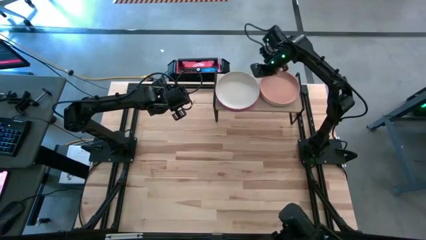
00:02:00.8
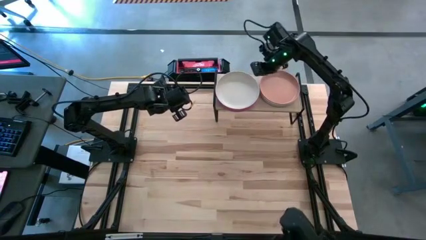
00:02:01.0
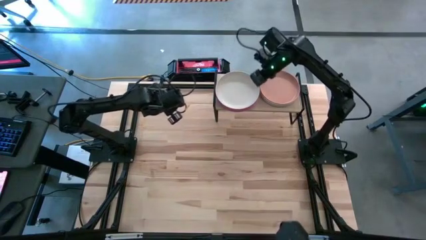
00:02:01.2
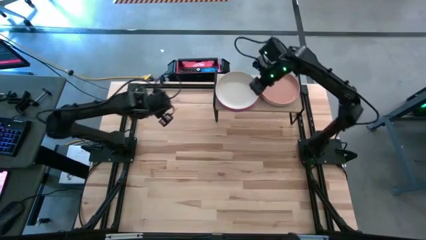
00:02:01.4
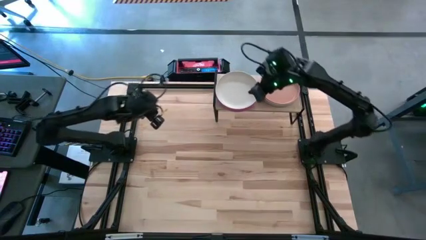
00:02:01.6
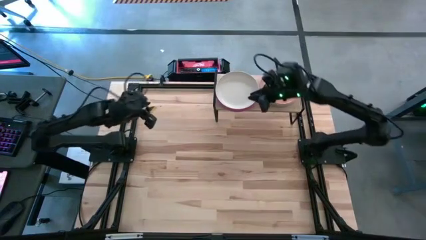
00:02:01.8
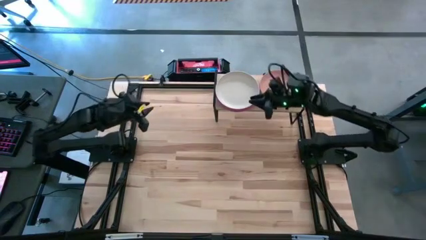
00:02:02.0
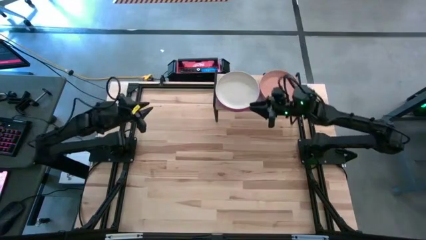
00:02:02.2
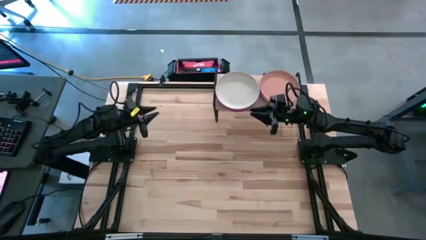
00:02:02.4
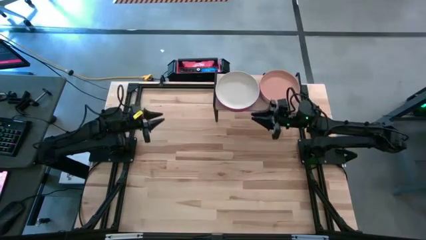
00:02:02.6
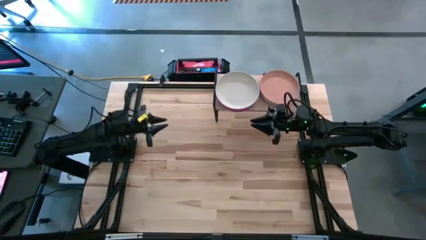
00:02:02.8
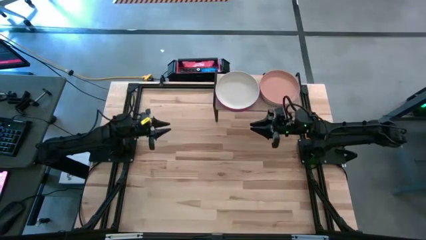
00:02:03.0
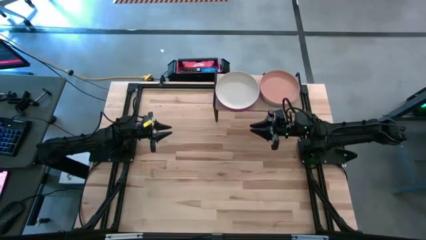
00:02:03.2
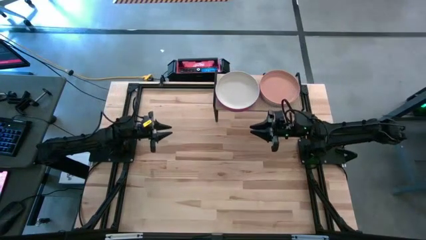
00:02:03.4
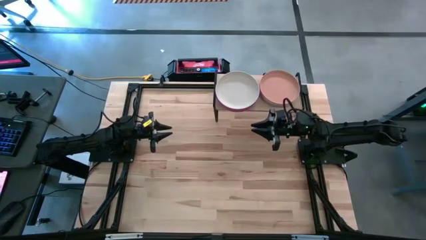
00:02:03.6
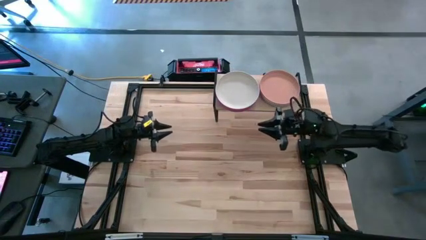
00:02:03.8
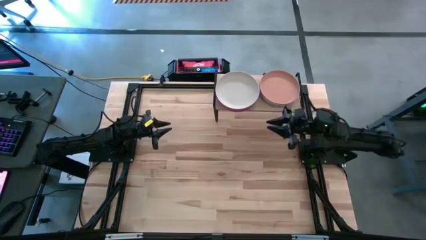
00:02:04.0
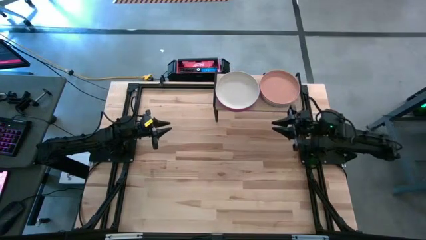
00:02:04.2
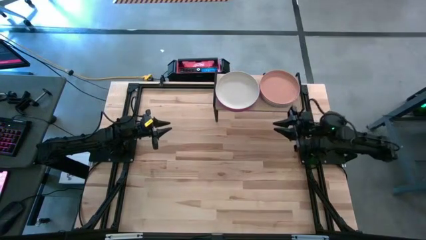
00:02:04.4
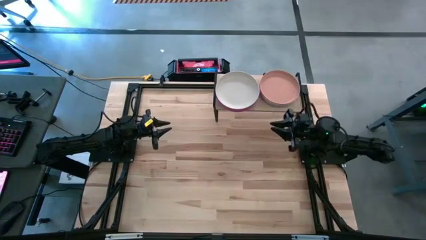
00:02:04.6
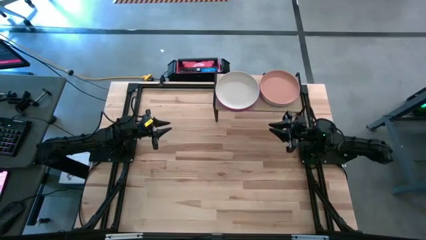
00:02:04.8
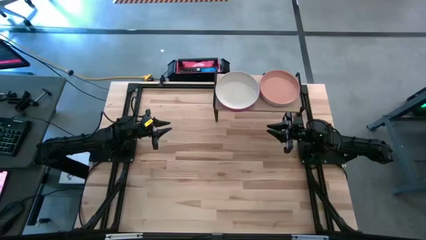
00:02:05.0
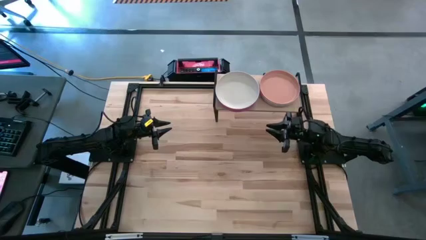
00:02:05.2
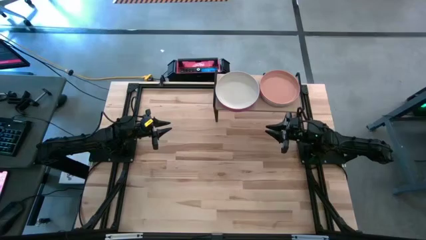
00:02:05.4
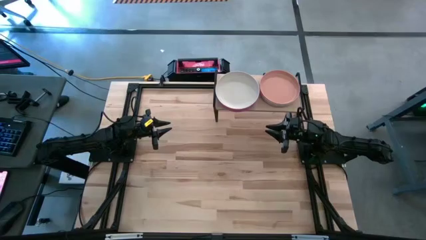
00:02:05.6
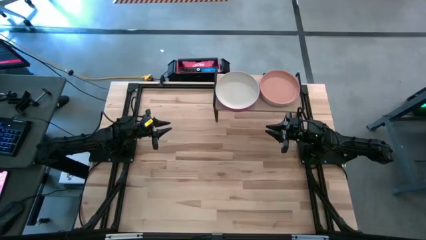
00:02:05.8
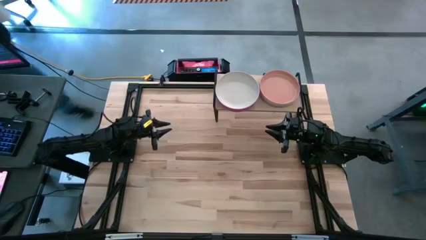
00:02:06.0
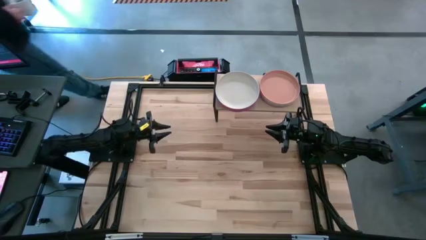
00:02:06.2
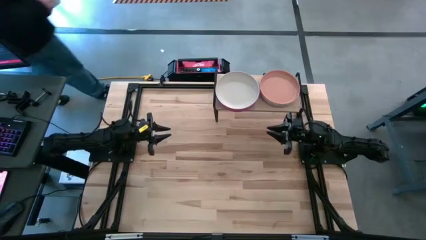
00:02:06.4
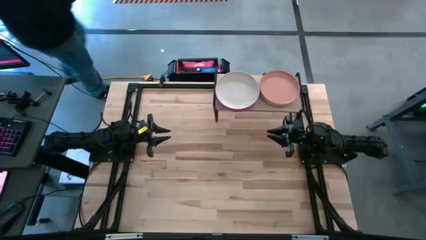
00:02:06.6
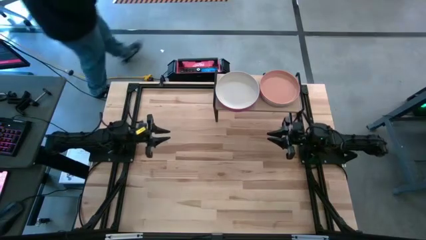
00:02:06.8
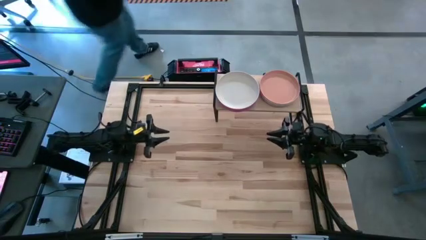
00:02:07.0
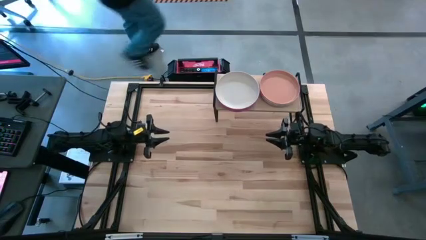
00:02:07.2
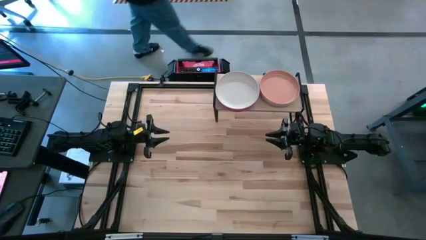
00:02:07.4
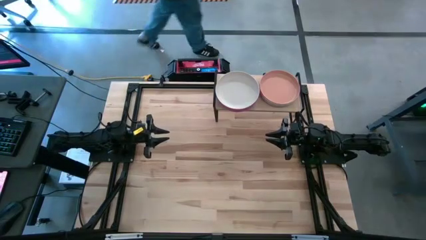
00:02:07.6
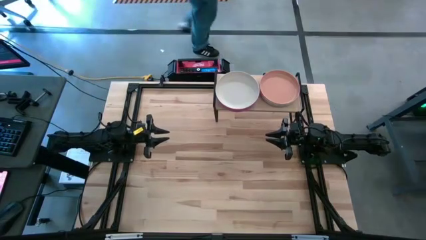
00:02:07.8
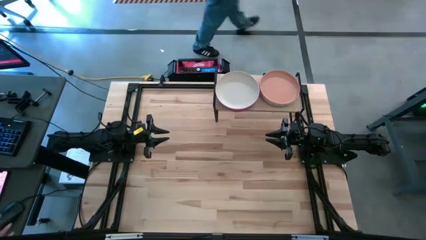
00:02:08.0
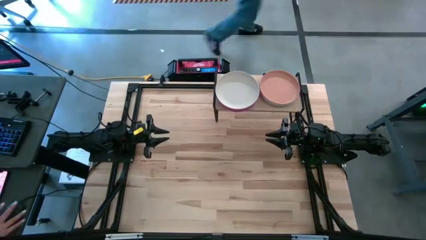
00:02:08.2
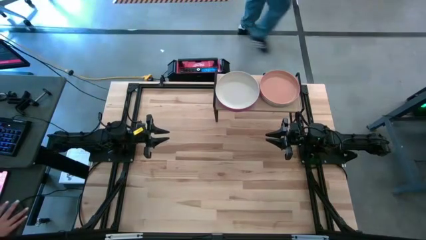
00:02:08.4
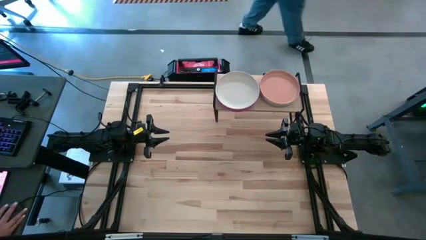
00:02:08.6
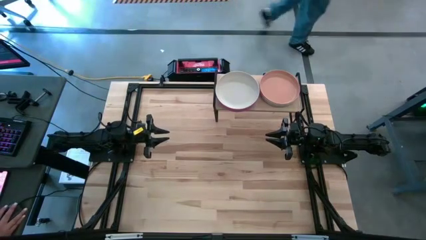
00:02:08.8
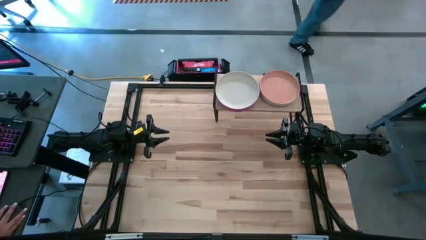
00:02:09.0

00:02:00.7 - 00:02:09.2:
Task: Place and stack plates onto a shelf
Return to Home Position

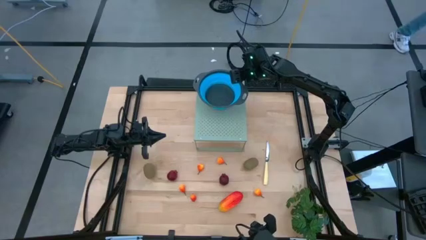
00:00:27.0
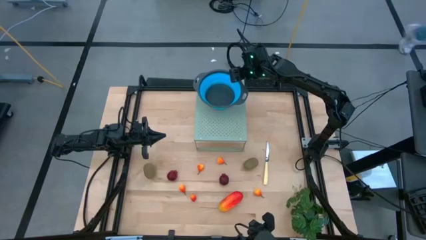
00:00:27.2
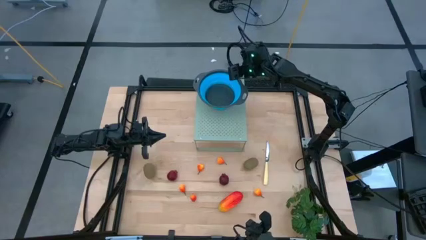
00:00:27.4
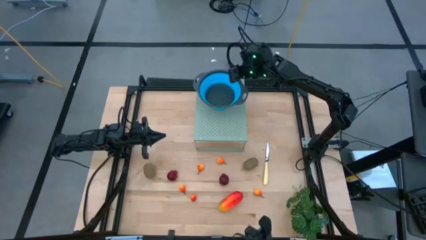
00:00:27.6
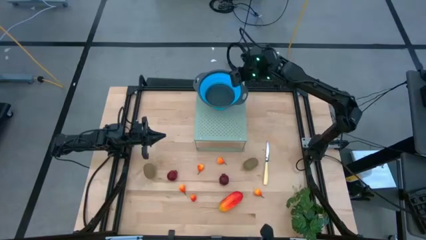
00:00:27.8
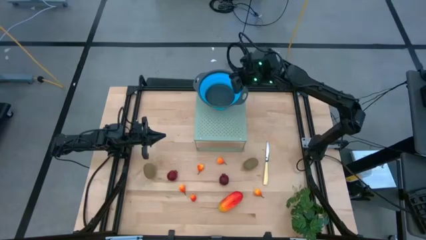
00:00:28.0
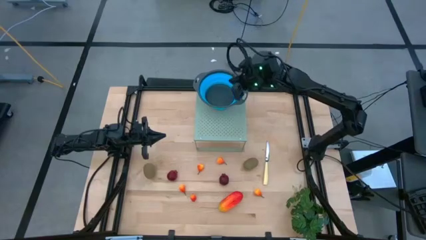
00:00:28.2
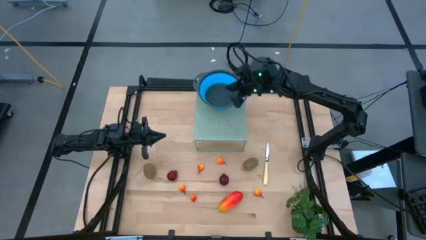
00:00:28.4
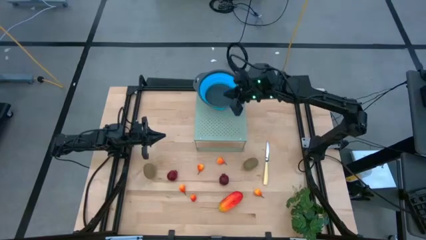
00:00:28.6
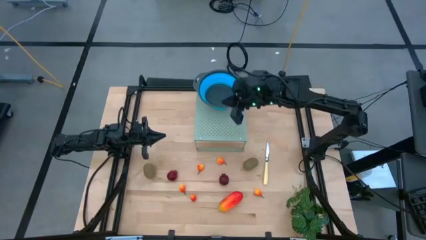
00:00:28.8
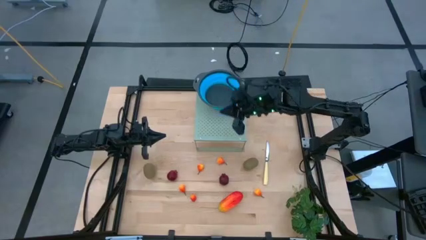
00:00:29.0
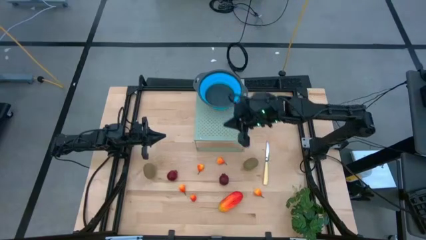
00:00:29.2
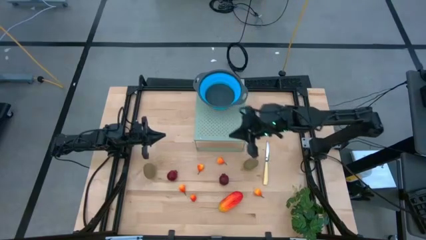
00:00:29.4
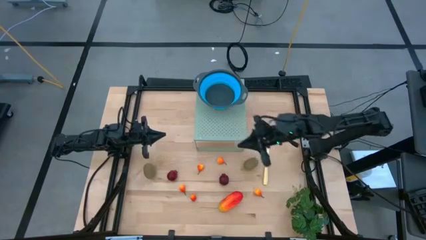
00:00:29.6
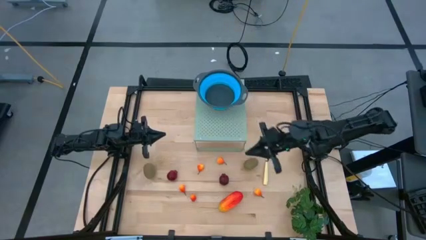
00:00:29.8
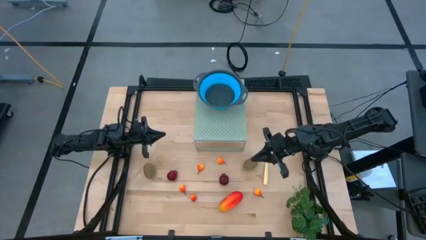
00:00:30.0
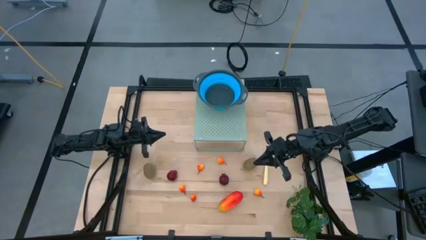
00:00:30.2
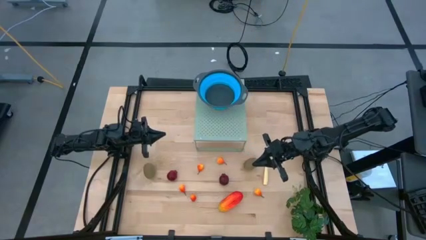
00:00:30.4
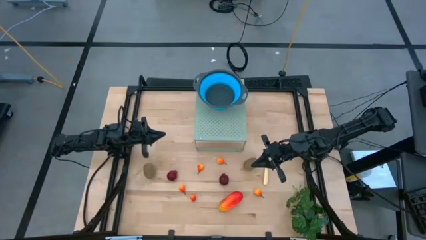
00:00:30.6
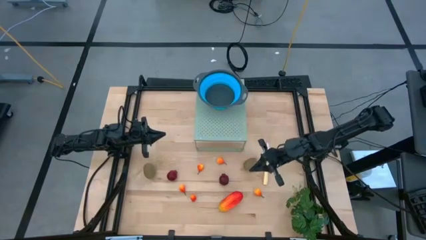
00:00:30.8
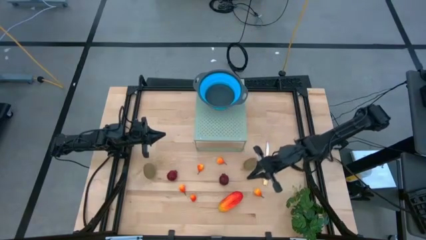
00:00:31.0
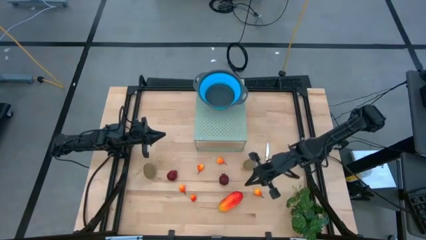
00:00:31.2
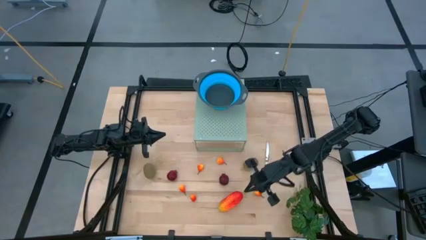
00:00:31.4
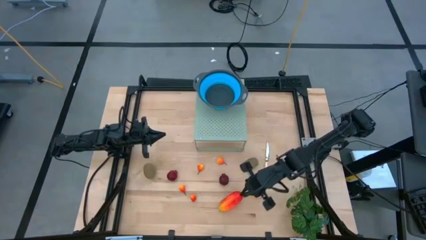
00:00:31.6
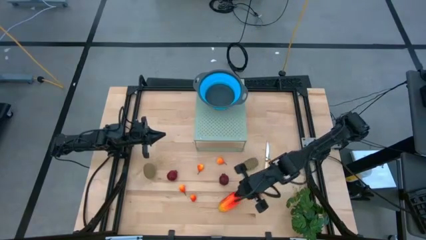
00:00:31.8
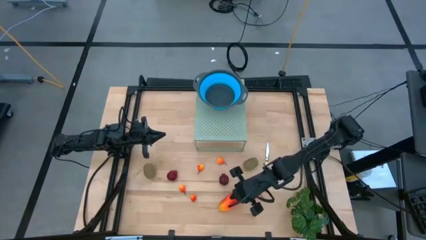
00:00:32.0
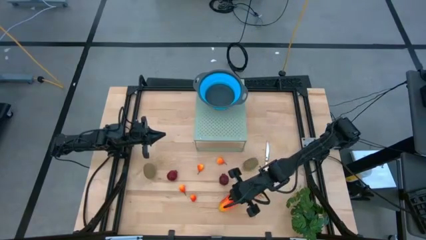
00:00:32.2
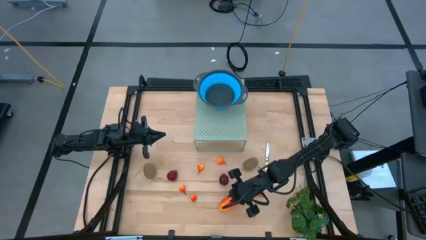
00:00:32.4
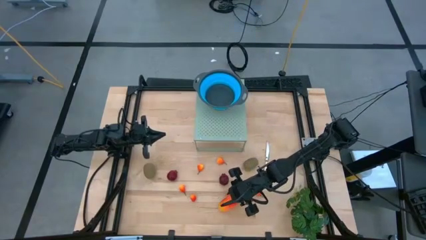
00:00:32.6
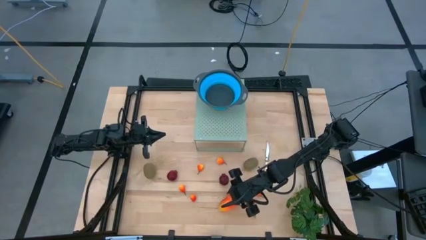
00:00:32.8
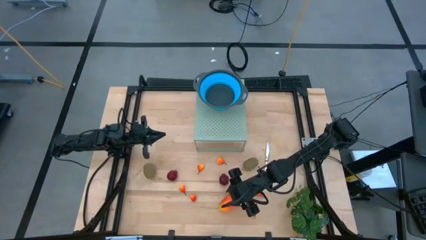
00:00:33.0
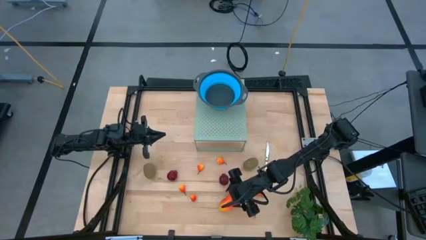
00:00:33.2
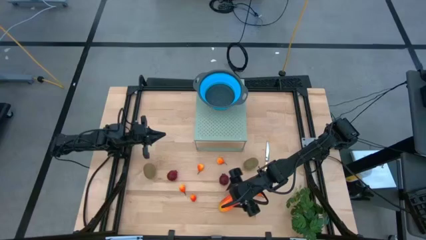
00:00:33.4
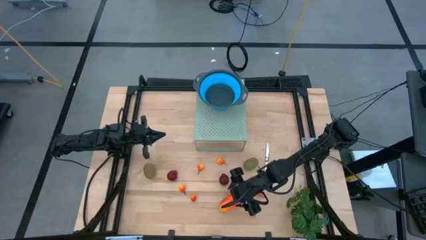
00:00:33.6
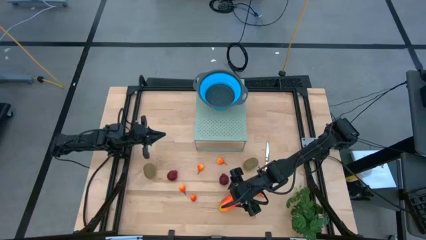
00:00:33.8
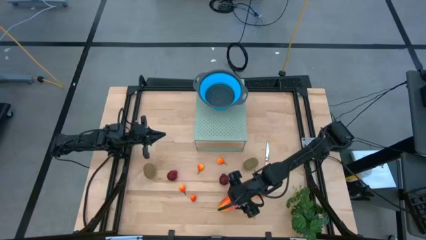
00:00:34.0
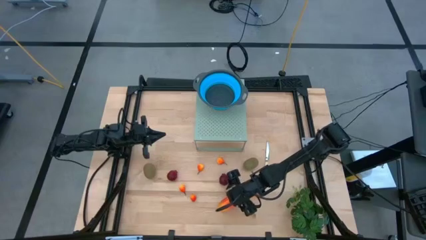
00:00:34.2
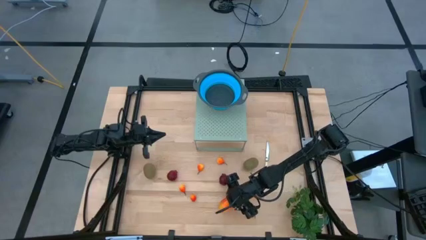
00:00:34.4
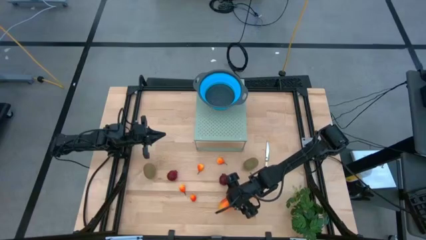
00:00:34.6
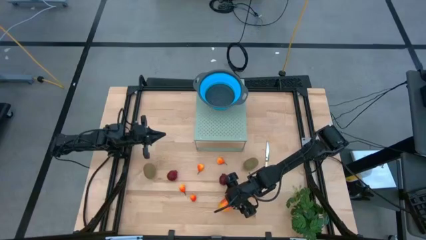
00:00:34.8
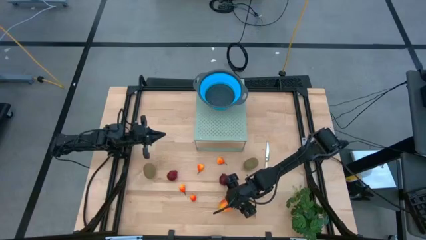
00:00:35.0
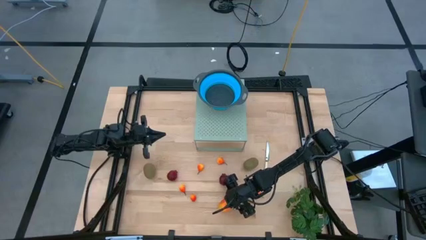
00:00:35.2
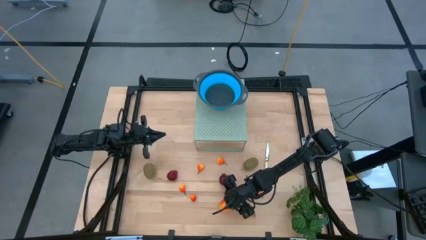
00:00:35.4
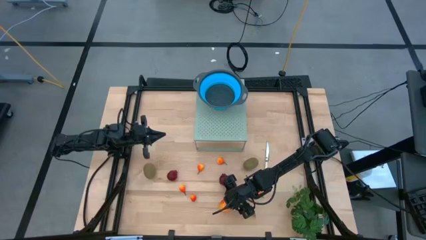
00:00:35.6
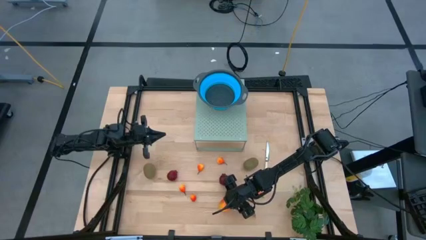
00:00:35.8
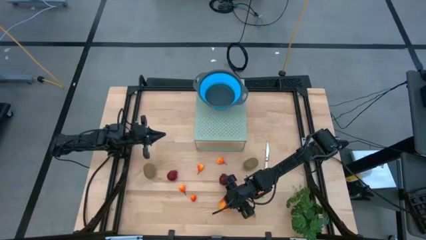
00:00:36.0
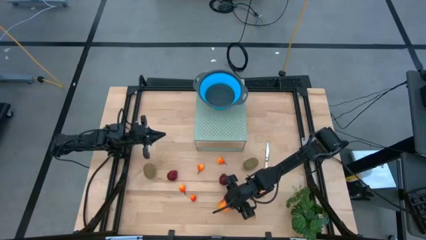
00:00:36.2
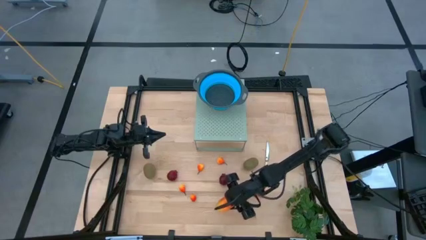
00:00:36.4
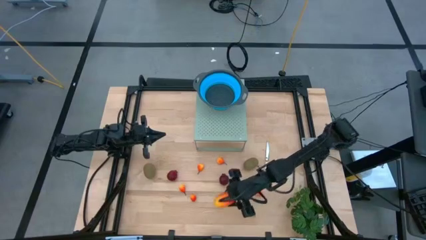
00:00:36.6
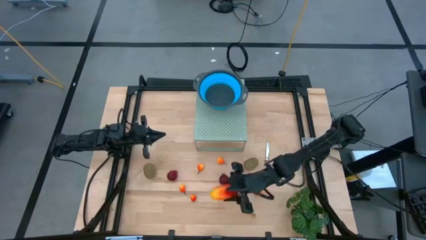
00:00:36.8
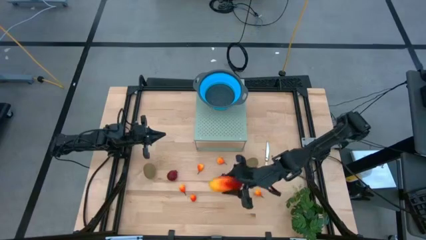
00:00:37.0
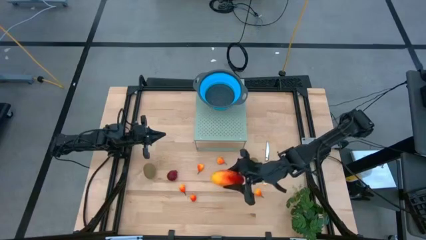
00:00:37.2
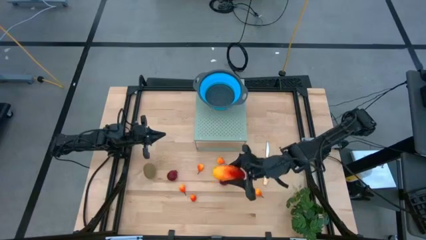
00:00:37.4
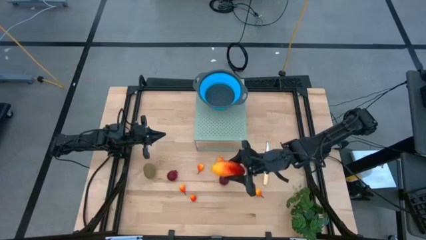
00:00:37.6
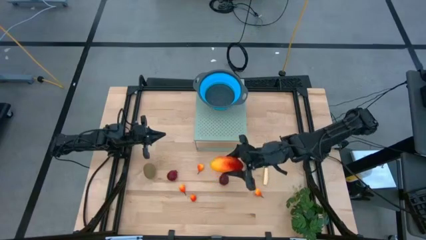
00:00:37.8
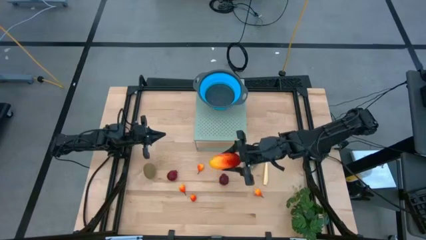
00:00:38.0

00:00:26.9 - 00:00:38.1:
Task: Pick & Place Fruit
Put the mango into the blue strainer bowl on the shelf
